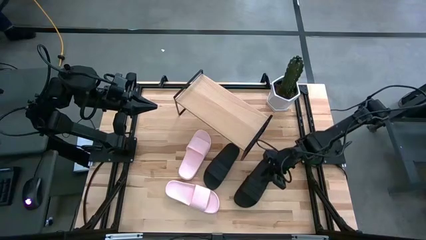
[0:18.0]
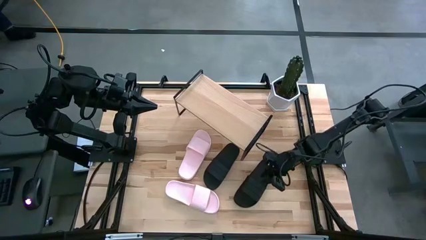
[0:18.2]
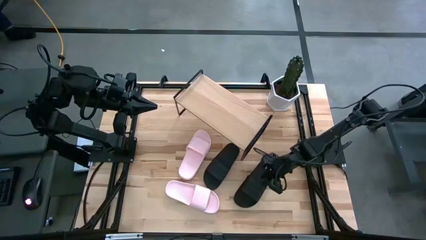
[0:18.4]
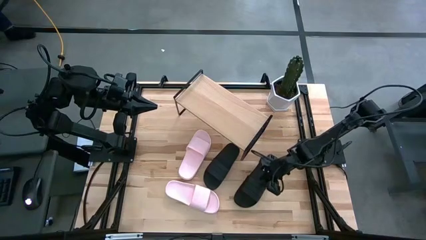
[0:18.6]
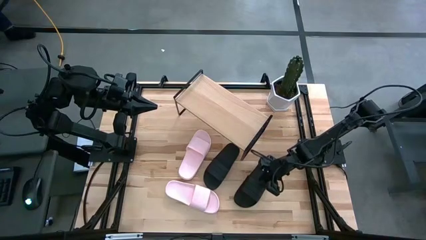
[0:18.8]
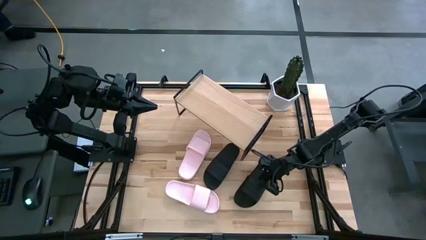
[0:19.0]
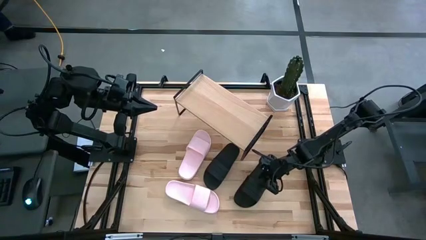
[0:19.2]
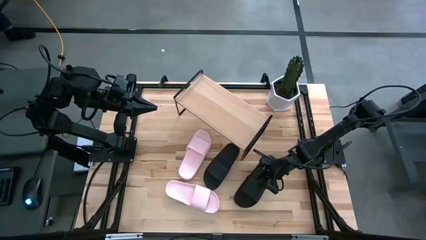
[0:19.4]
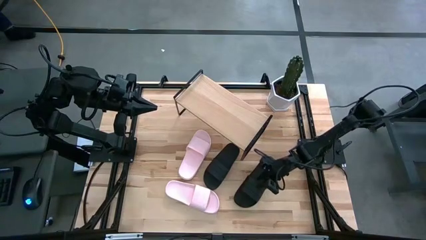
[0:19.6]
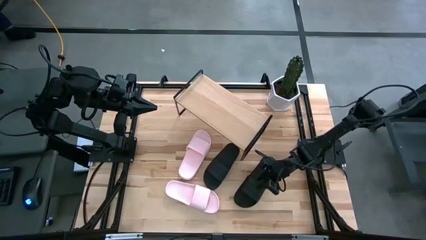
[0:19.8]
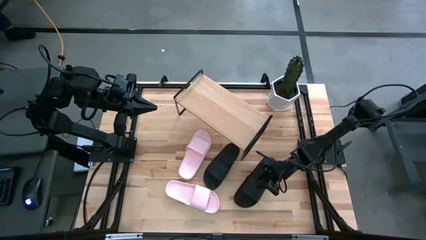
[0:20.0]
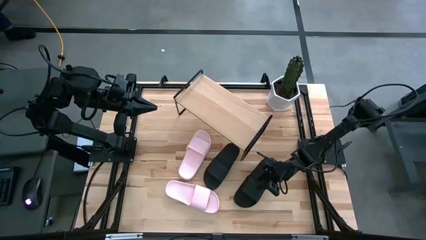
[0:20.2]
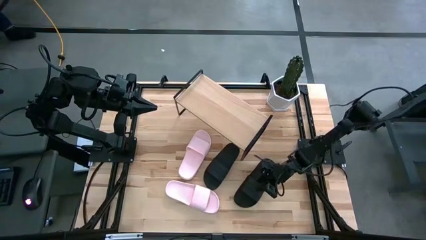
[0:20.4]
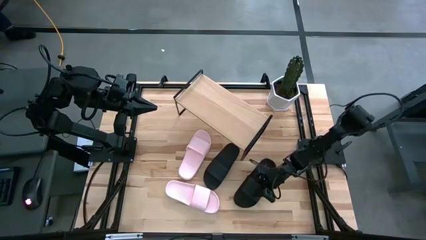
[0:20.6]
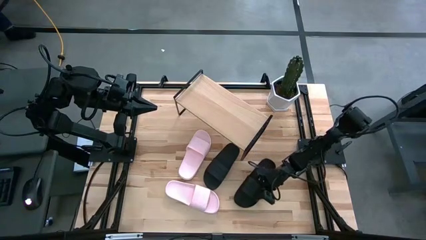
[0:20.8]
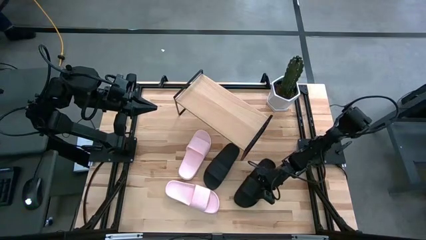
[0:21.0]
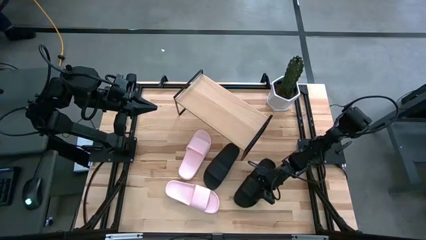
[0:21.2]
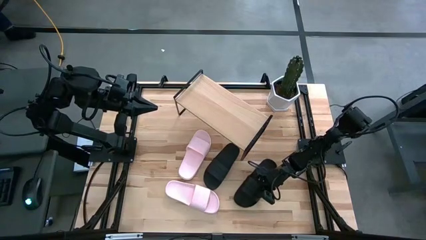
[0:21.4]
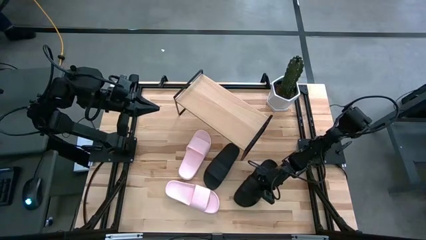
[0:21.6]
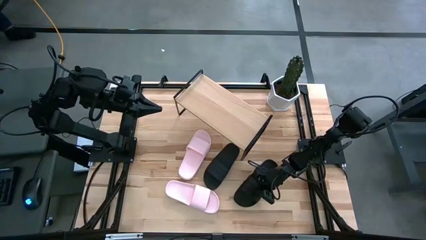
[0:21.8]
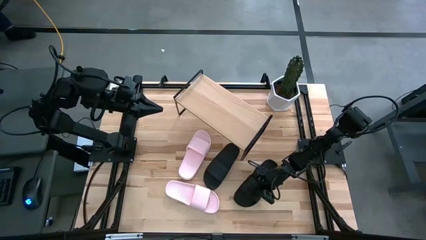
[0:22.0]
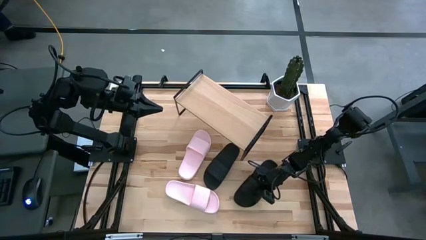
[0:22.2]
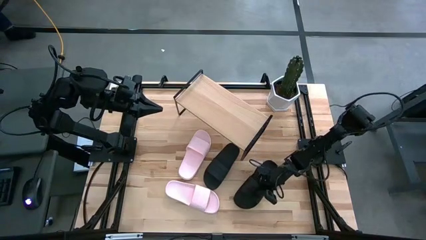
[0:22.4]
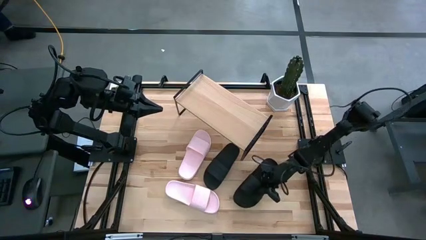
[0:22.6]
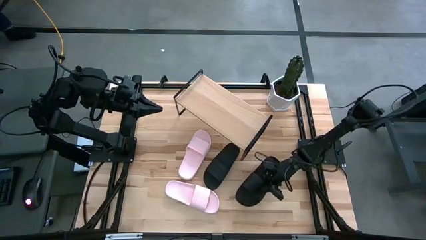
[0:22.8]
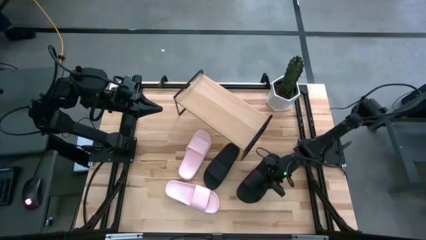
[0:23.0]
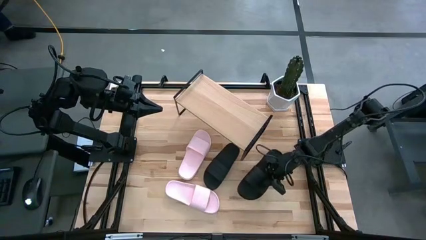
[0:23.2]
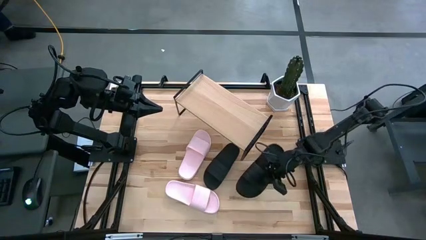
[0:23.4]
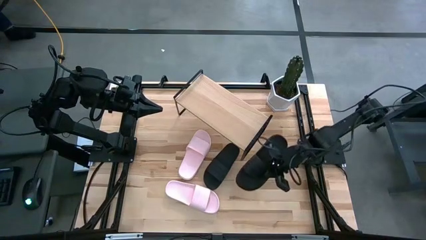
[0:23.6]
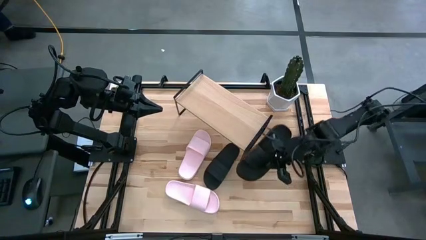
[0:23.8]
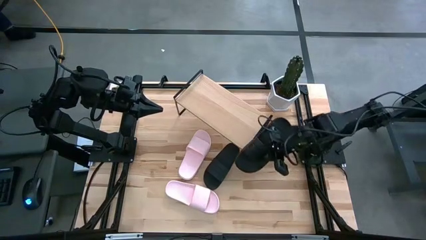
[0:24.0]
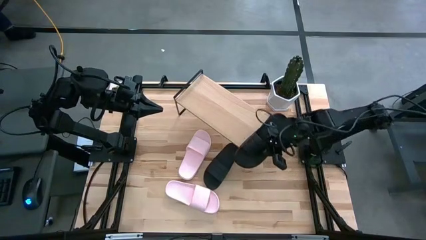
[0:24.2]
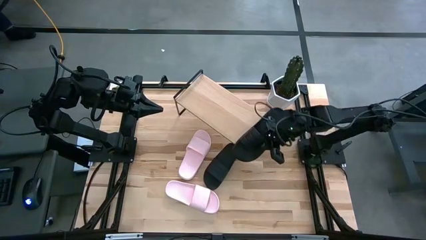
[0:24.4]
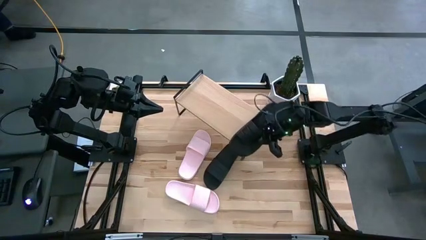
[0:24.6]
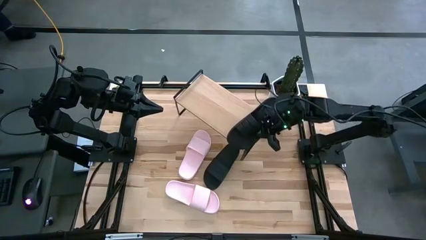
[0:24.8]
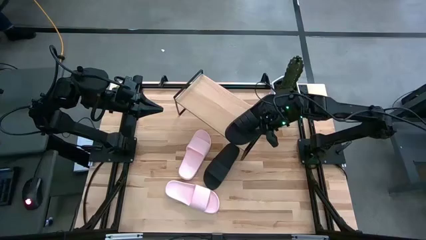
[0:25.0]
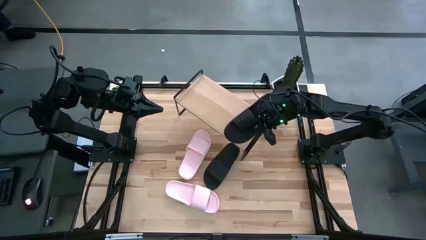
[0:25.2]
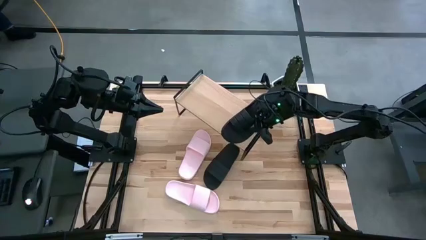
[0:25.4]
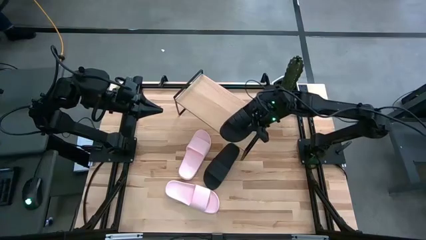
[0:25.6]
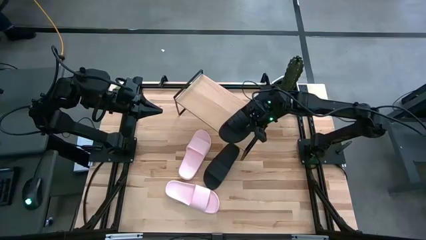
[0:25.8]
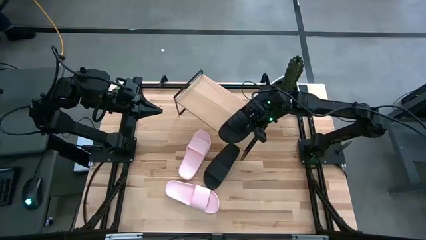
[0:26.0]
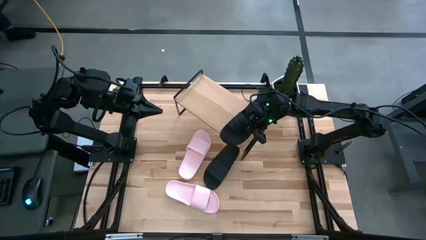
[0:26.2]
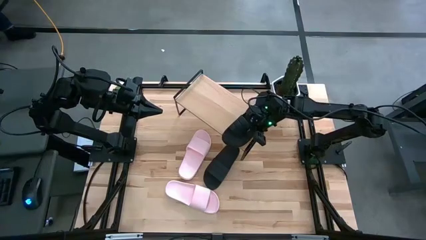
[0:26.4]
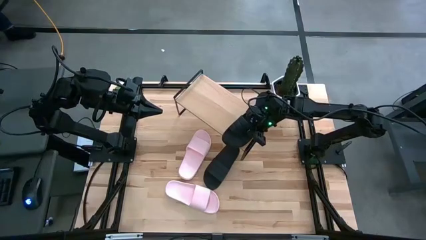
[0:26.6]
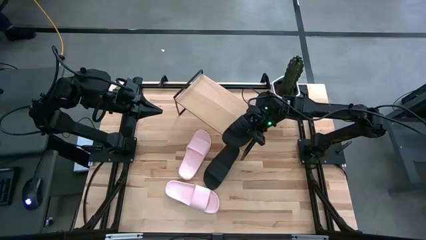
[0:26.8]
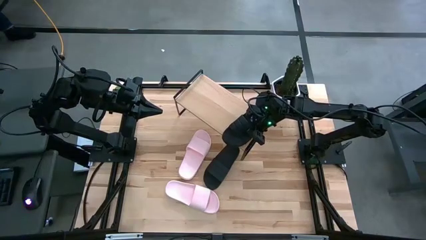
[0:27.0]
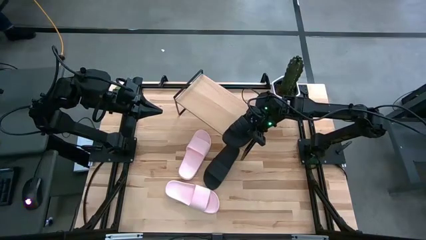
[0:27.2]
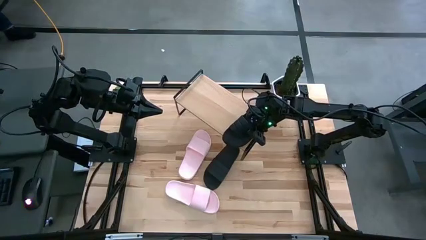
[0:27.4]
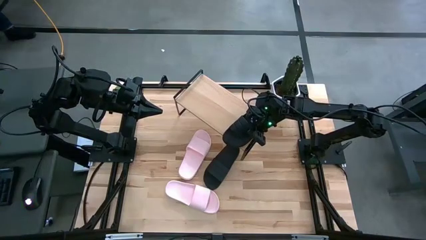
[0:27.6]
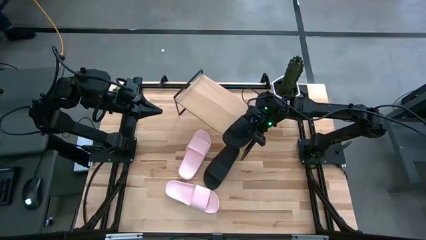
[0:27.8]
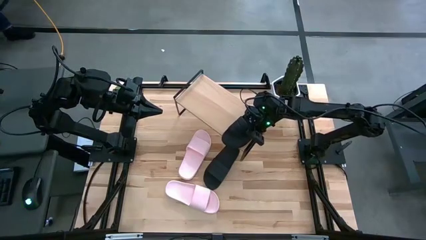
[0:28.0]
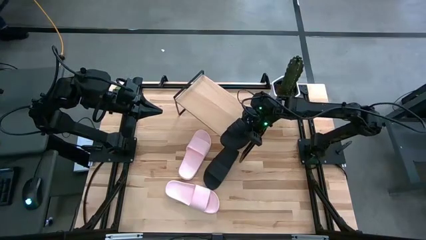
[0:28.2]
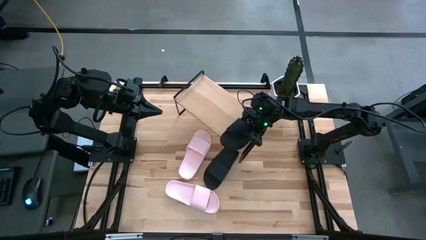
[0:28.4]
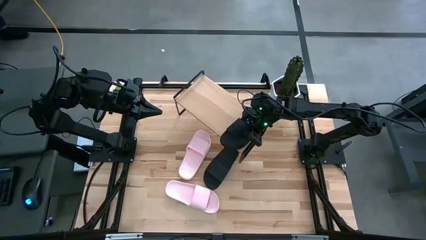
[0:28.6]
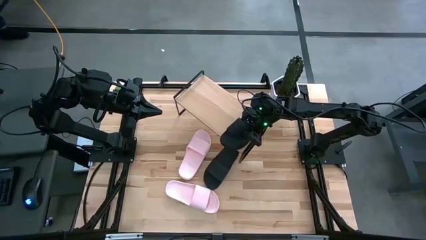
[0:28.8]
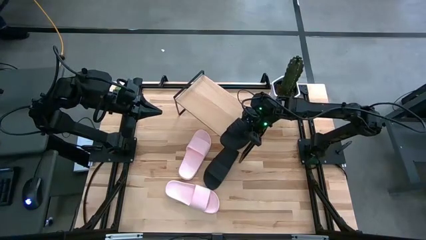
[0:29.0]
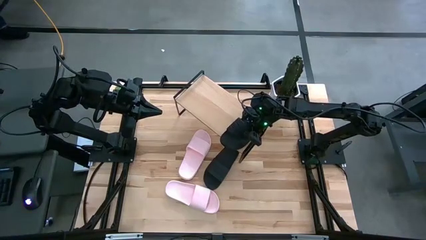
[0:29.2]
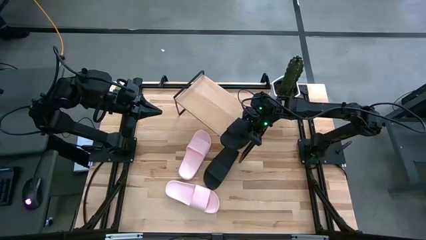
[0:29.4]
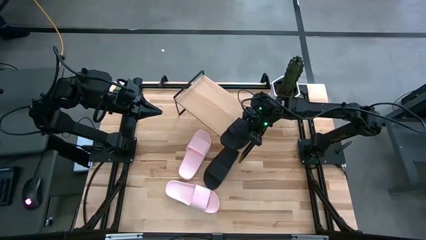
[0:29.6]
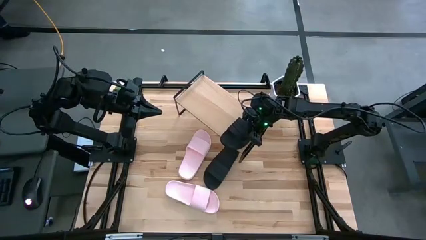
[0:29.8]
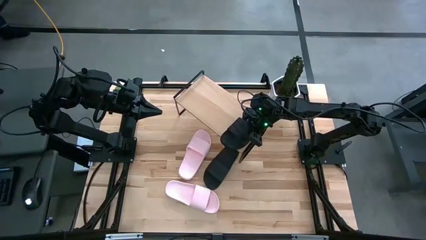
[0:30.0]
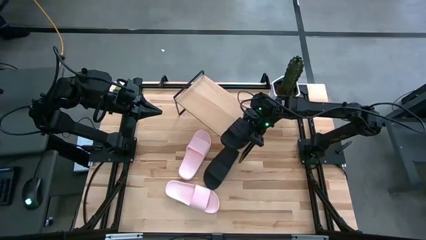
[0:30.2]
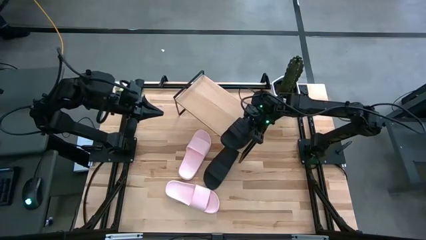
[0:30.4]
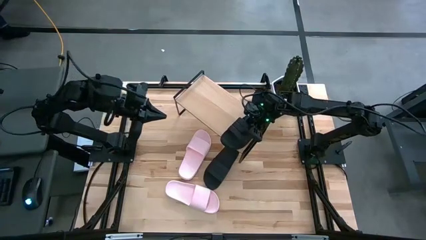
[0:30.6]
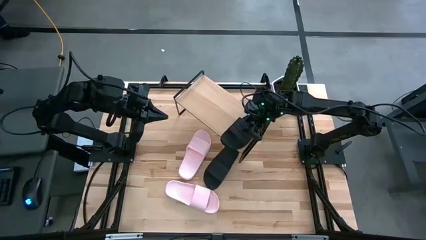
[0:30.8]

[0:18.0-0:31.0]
Task: Pick and place slides into the shelf
Put the right black slipper on the shelf

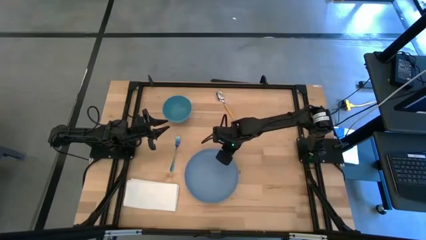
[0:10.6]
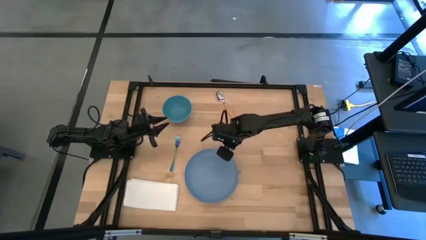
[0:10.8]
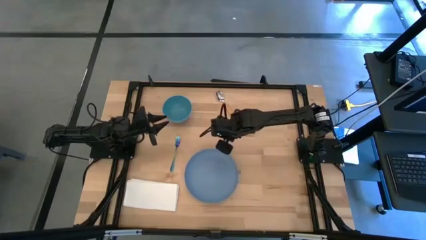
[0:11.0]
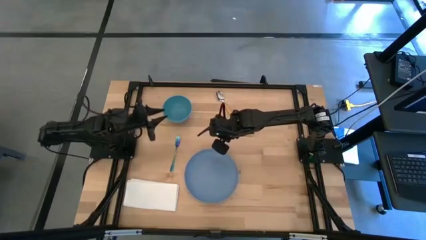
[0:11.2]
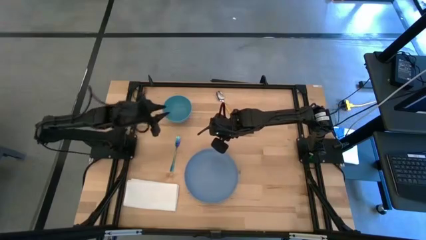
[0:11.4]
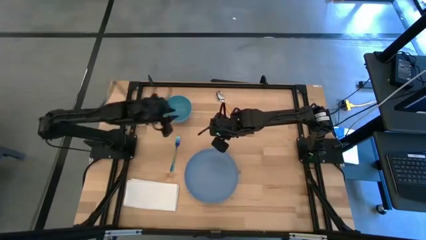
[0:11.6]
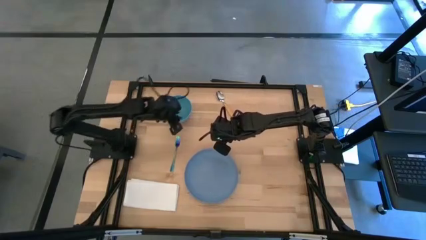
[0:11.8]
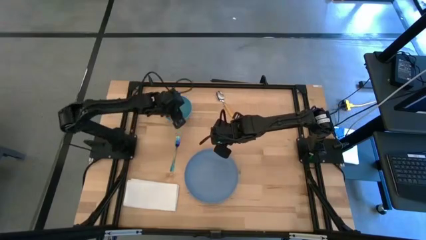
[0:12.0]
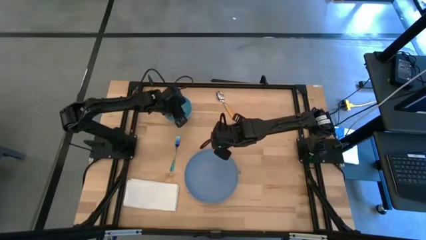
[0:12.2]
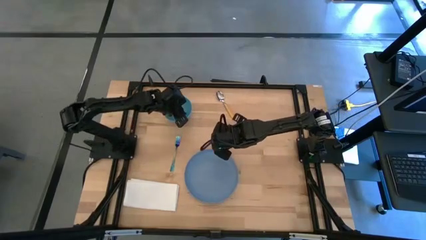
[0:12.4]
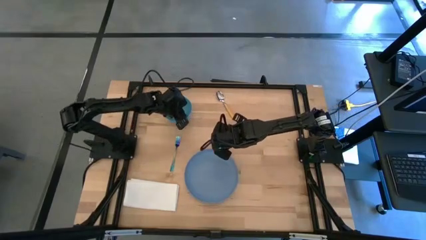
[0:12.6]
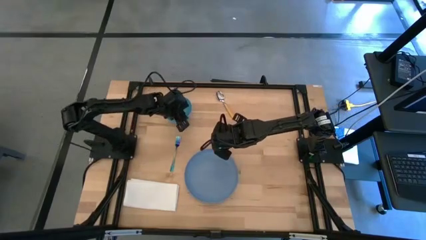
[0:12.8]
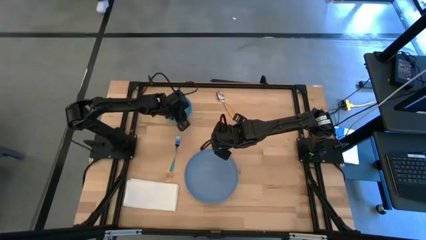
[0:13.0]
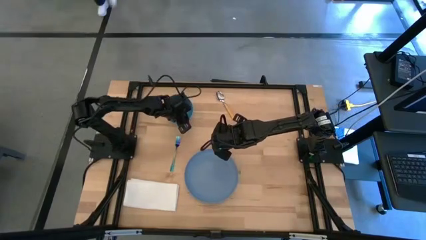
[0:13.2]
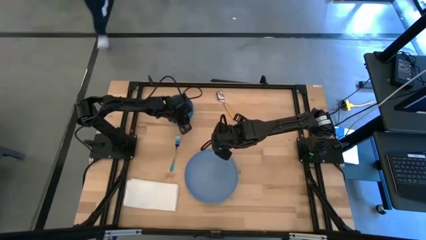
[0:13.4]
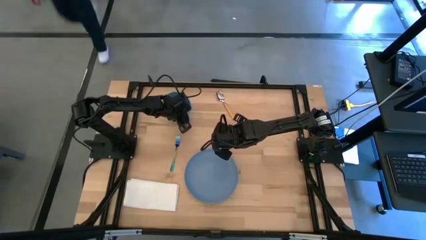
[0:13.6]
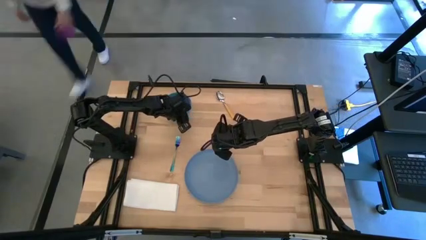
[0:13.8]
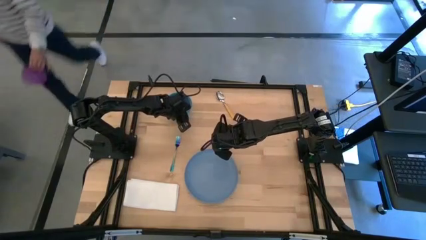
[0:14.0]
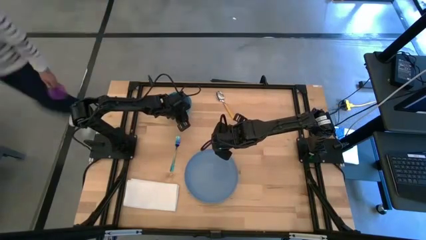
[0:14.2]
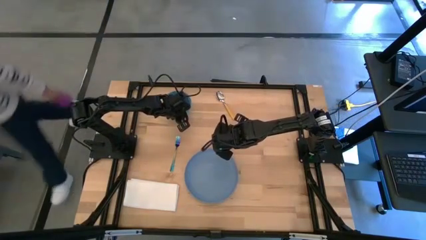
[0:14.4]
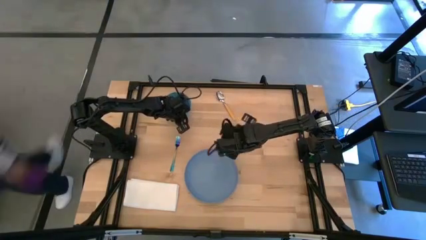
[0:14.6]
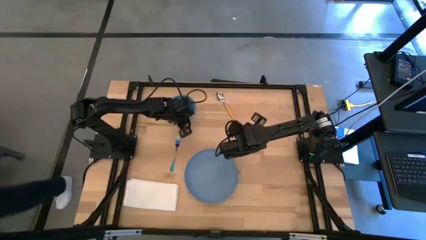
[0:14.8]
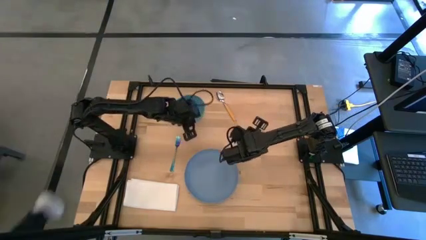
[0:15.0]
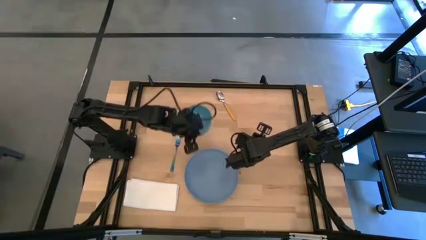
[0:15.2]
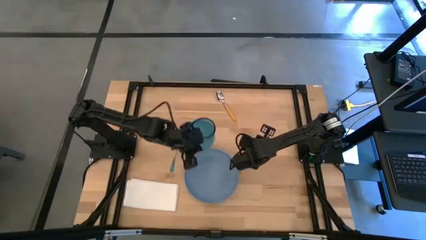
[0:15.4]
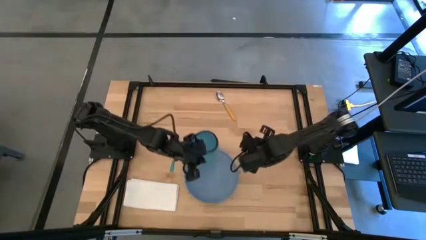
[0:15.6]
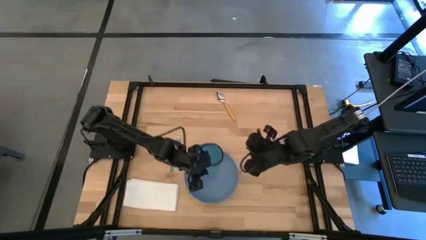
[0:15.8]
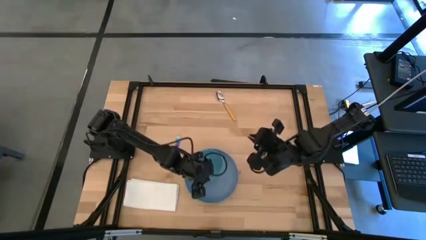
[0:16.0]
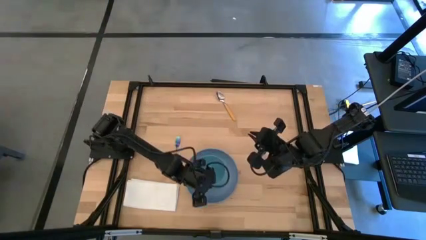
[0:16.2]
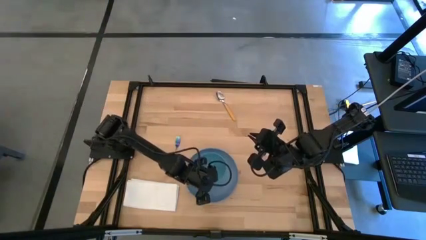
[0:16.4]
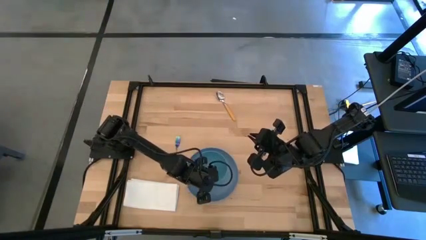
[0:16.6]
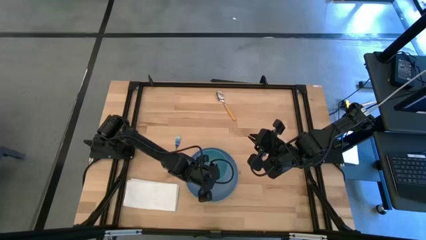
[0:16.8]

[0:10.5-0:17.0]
Task: Set table place
Put the bowl on the plate
